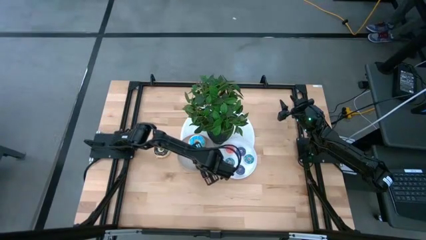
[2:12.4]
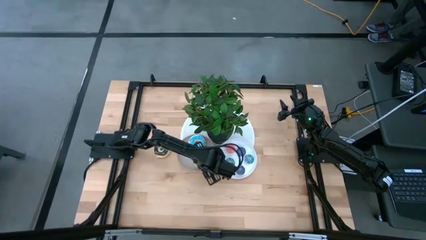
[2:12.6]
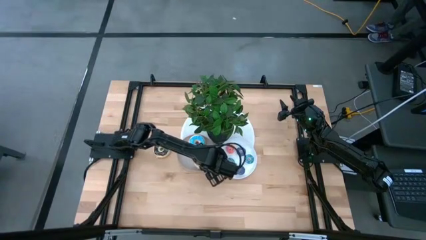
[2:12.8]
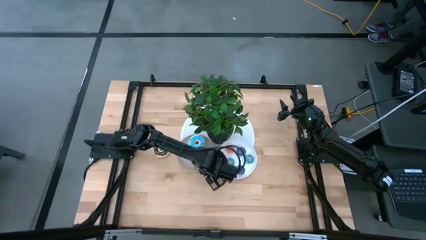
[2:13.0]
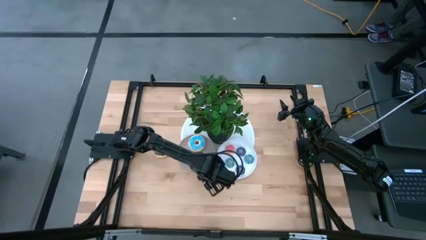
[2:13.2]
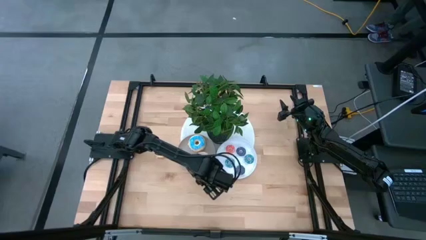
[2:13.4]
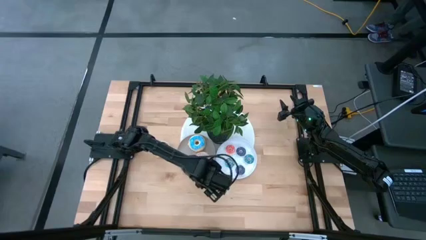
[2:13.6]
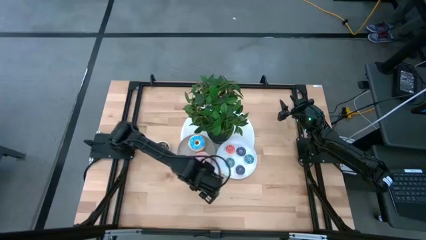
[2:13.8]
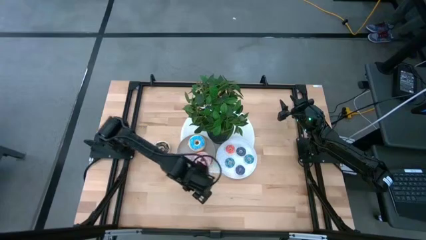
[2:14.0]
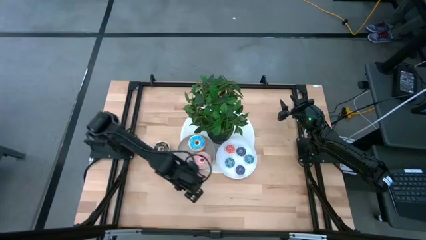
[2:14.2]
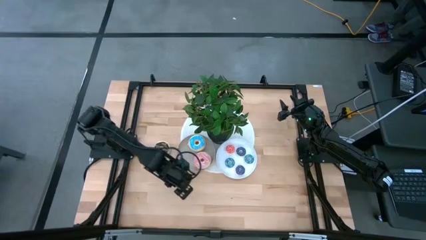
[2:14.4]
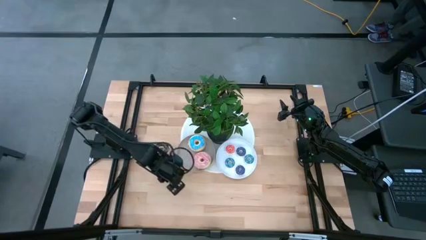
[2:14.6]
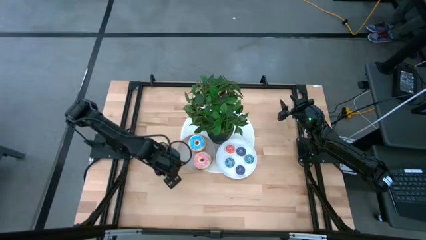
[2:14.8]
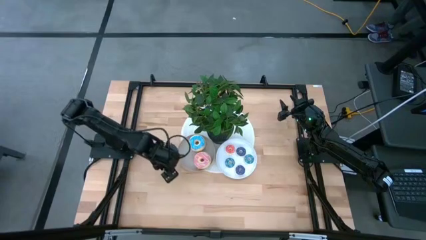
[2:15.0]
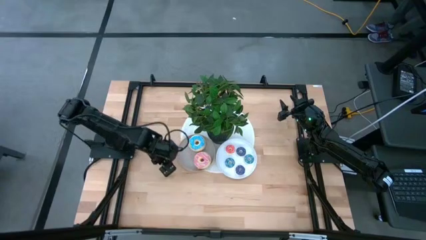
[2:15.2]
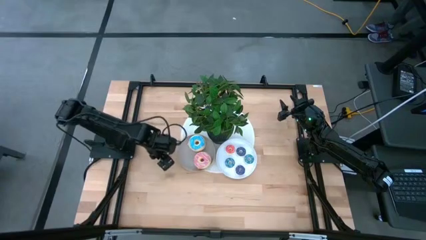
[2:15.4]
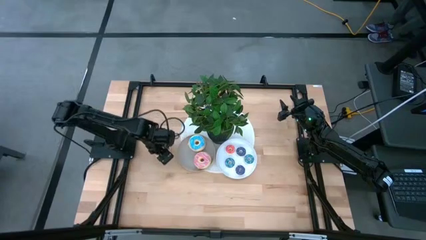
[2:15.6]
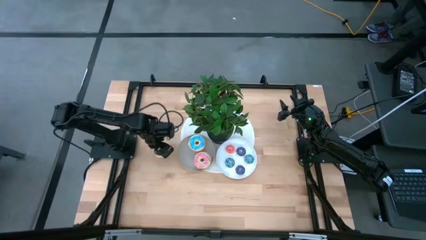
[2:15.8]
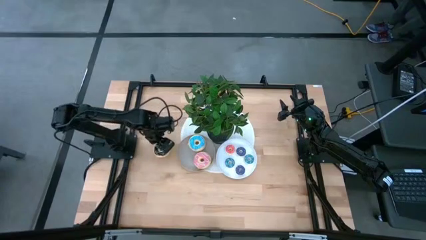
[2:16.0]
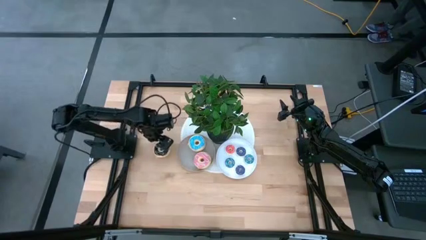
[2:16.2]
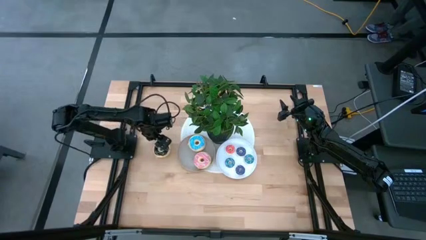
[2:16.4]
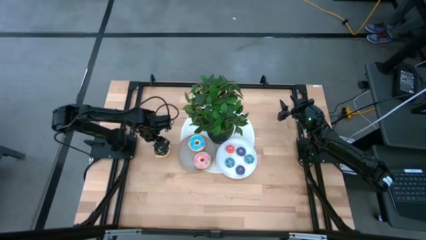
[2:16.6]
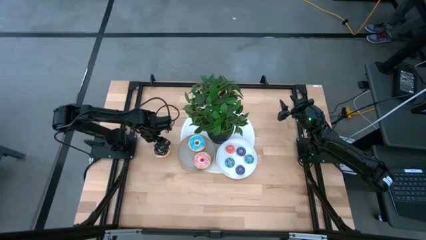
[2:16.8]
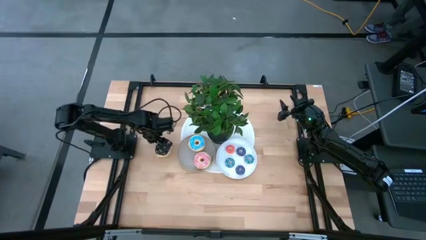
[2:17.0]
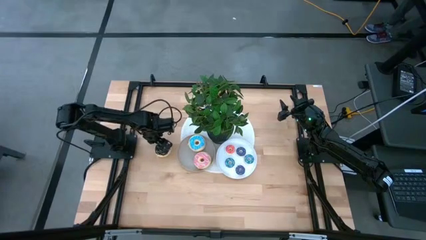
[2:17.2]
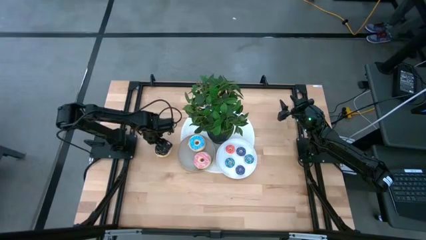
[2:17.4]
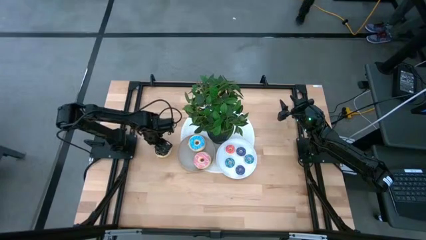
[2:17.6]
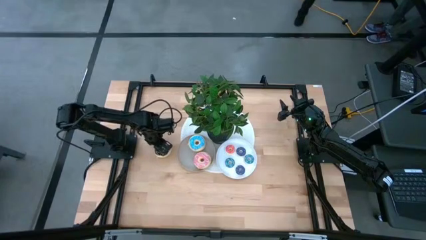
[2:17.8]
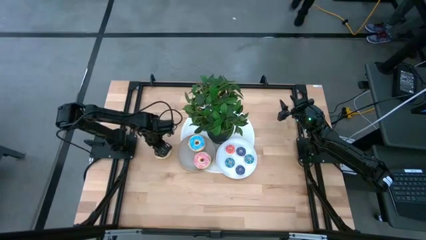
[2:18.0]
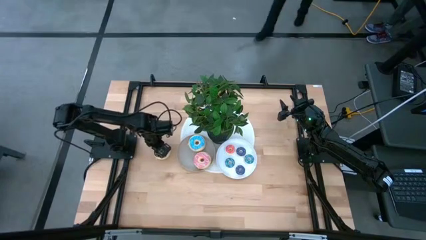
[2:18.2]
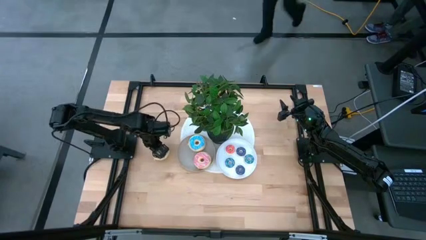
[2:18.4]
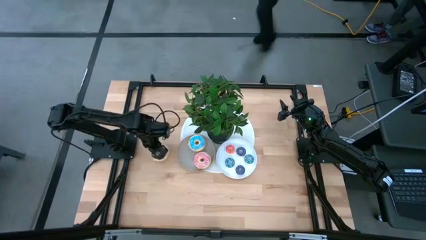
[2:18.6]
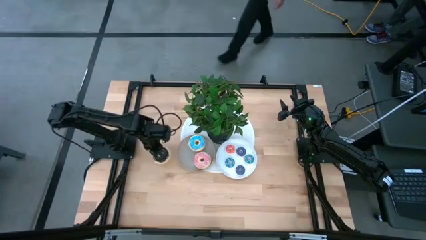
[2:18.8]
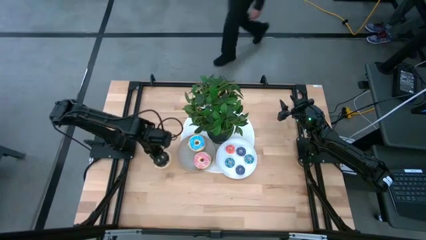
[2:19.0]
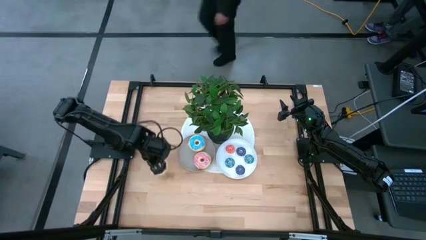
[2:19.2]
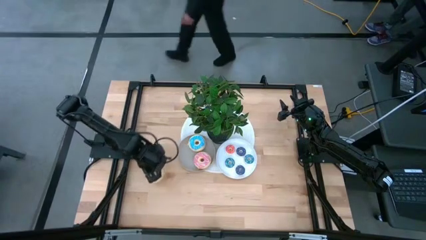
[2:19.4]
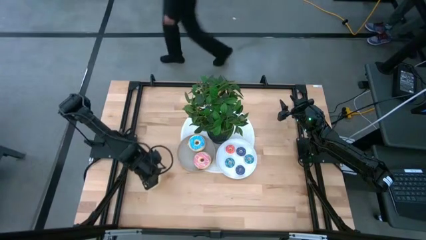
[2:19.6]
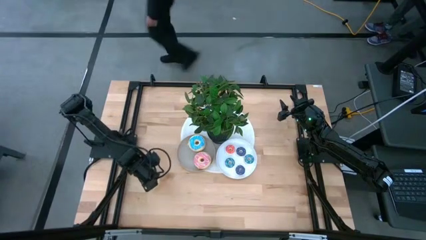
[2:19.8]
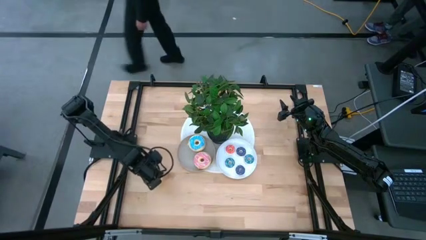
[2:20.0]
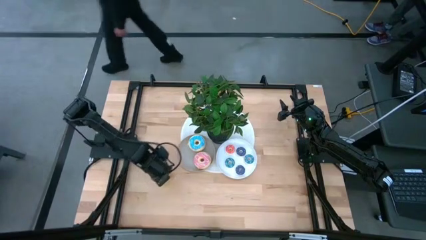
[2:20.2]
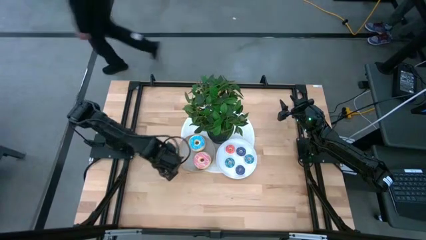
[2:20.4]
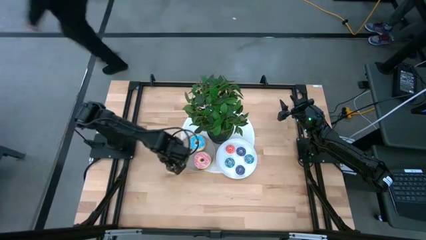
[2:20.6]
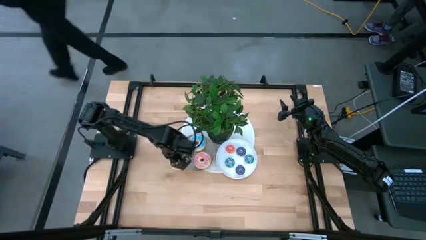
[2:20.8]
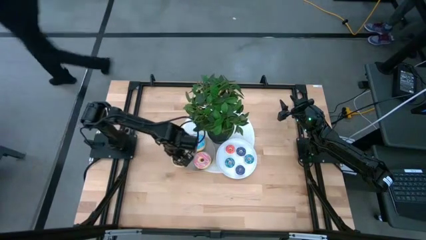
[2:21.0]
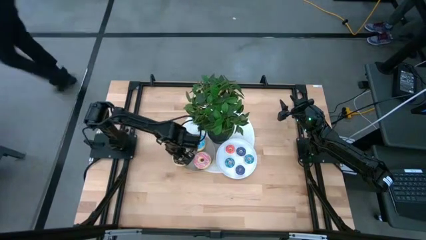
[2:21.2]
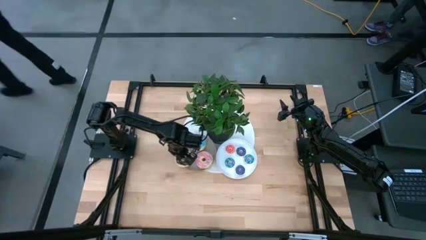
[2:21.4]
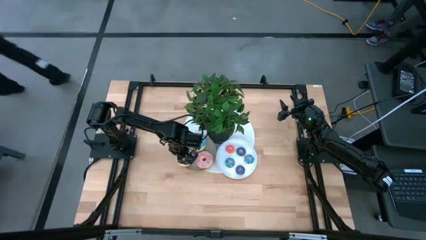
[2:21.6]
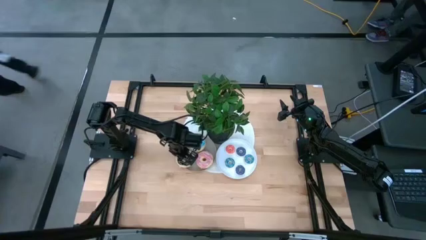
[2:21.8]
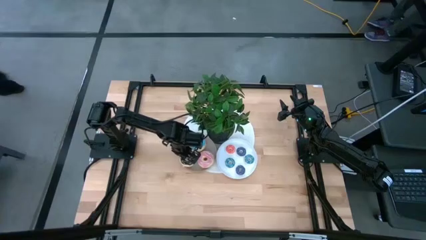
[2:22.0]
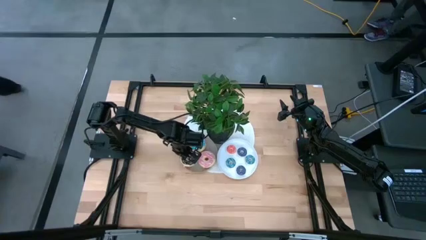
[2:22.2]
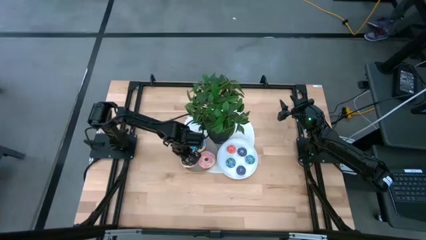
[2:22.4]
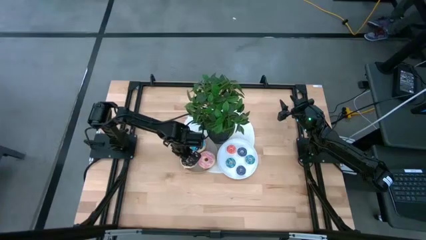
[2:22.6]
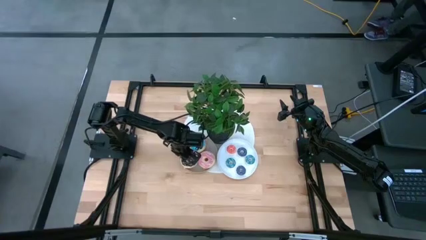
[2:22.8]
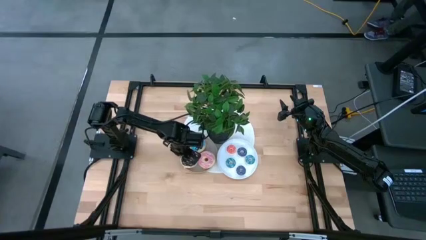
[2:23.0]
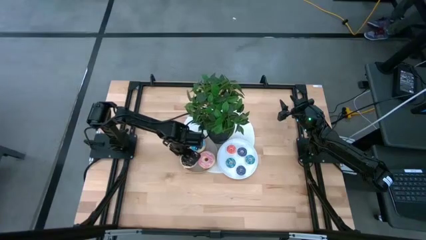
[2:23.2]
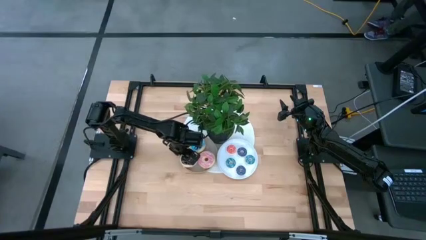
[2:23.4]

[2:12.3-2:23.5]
Task: Pick & Place donuts
Put the large black donut on the beige plate

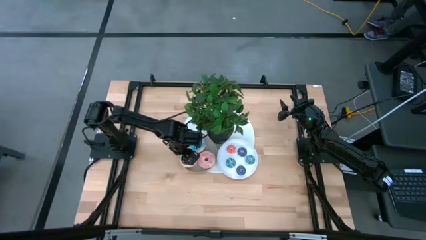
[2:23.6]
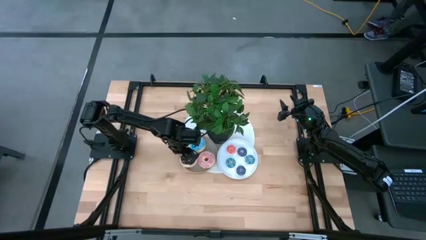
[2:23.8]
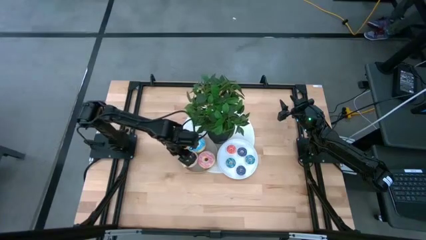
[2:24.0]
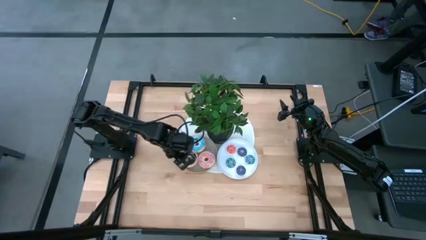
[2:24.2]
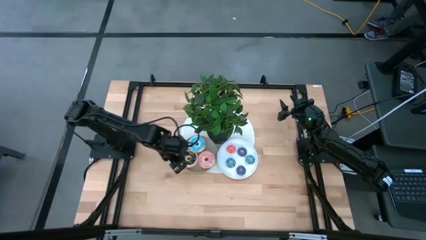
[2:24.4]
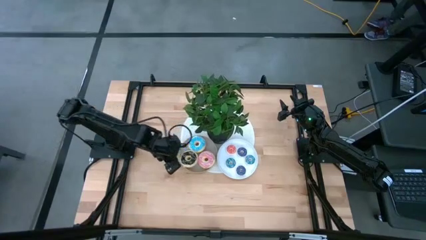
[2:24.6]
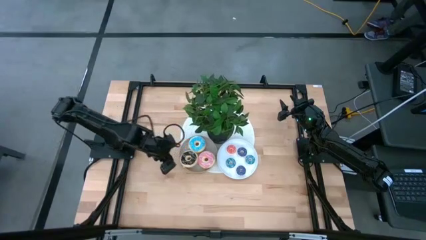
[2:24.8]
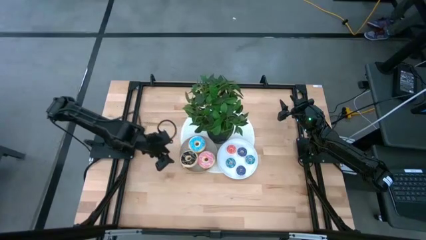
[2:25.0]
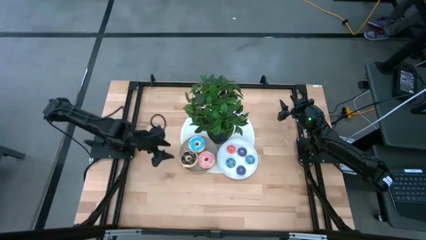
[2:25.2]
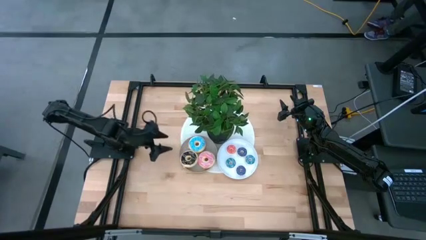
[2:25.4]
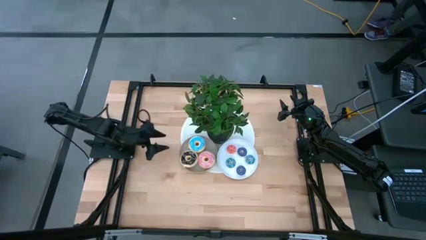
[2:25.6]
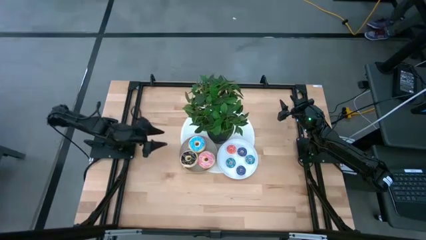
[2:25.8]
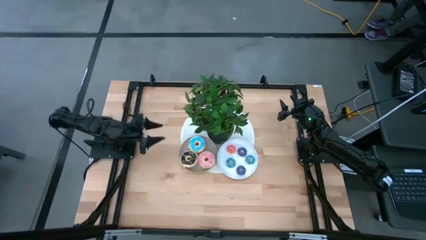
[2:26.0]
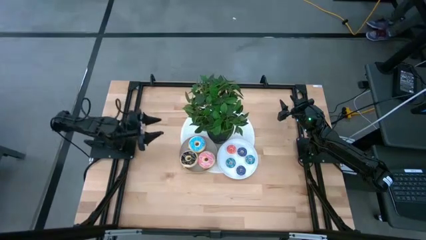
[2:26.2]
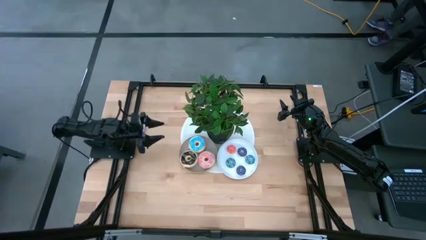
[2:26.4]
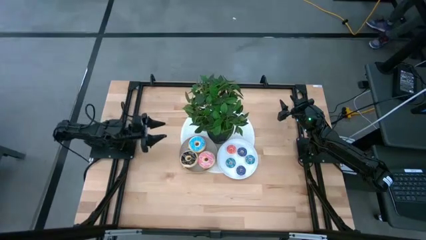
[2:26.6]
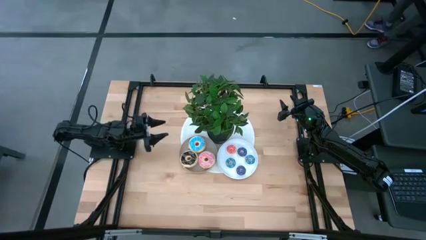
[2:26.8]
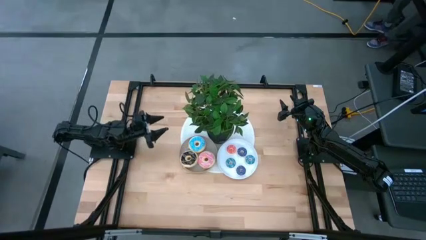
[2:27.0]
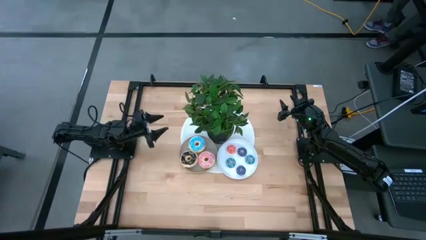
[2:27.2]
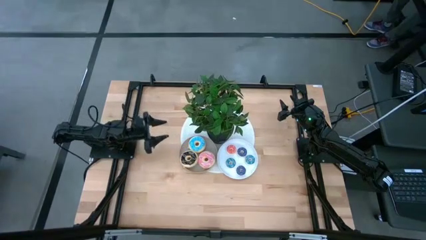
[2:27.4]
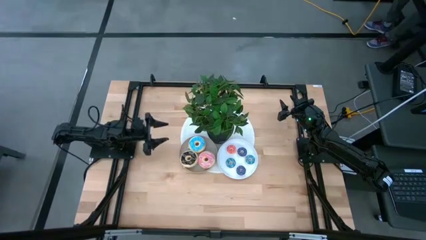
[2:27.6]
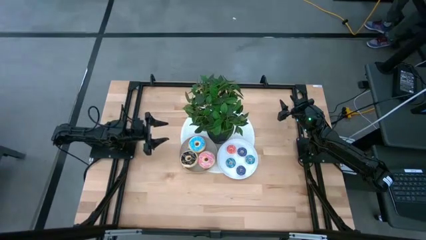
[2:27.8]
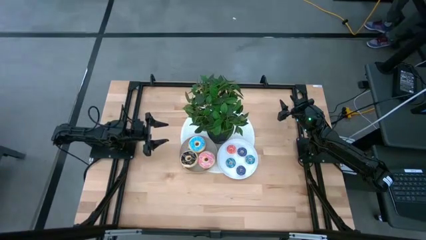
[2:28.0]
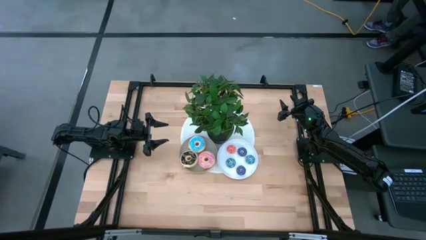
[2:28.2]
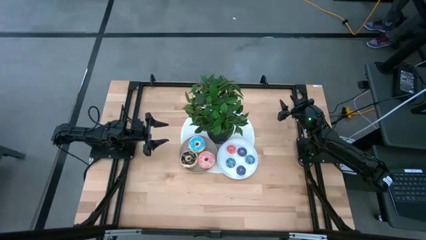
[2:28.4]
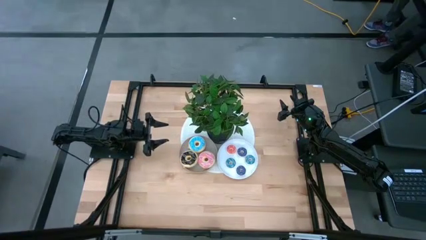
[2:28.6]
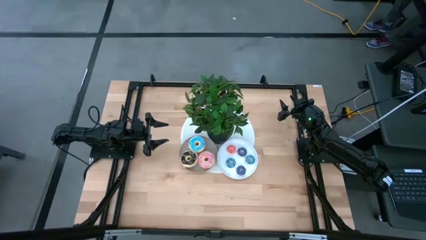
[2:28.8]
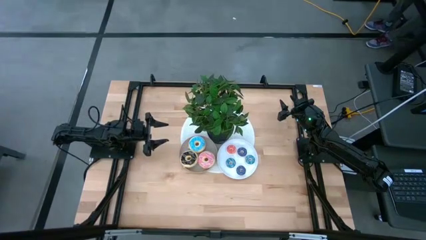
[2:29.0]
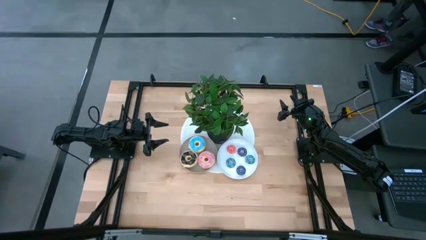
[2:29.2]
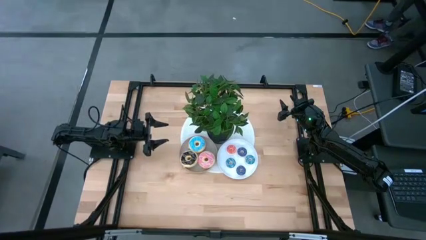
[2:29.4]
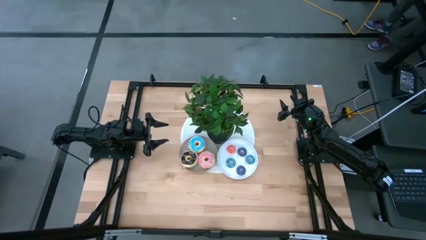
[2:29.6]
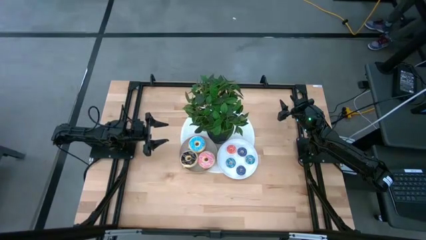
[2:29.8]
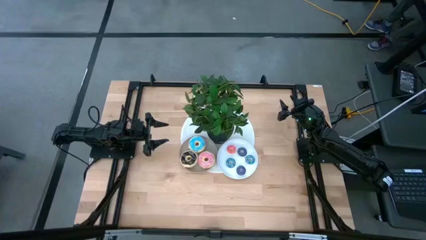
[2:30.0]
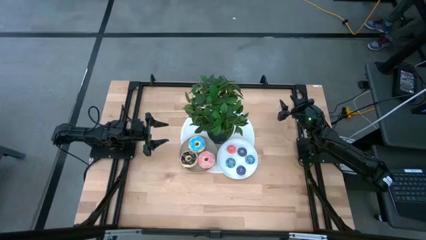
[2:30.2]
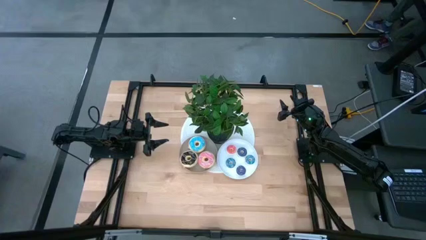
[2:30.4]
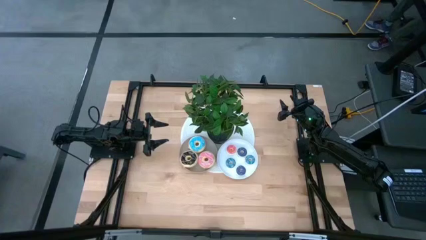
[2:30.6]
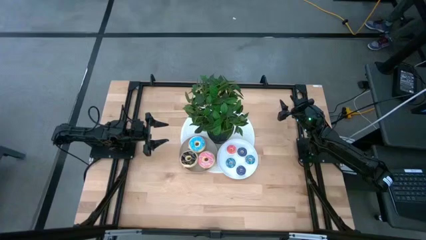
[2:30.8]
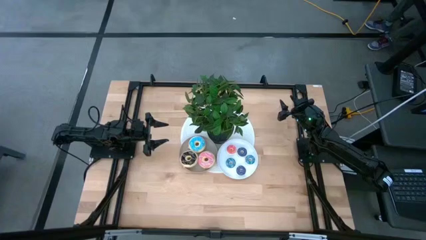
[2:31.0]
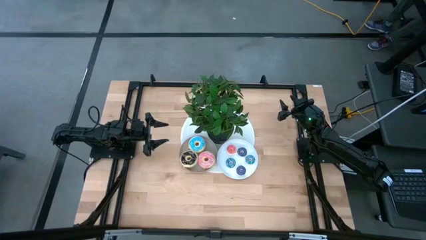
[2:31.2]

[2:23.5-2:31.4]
Return to Home Position
